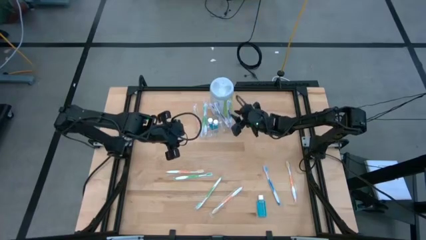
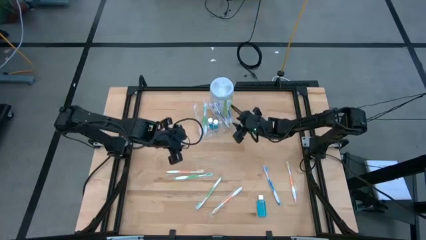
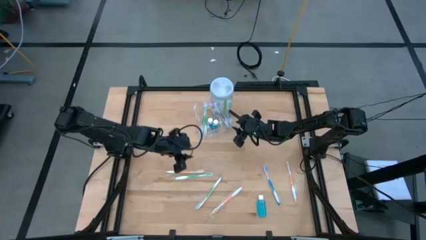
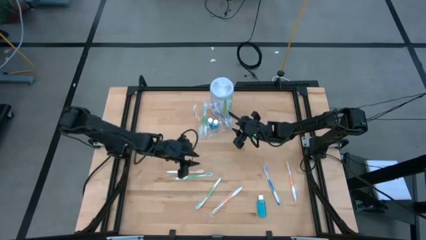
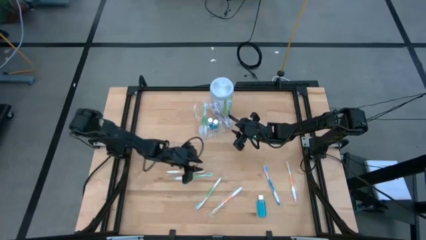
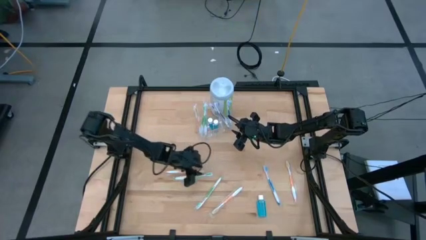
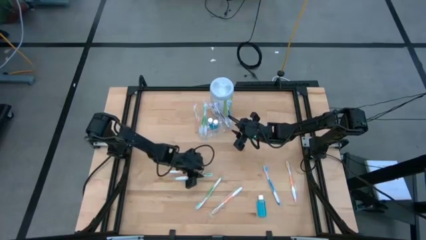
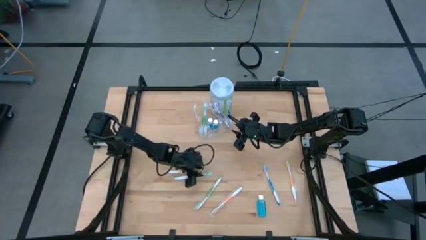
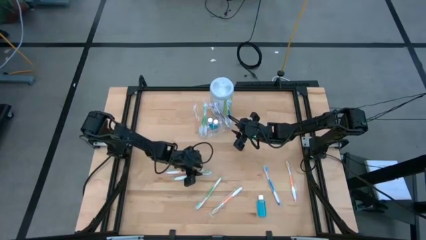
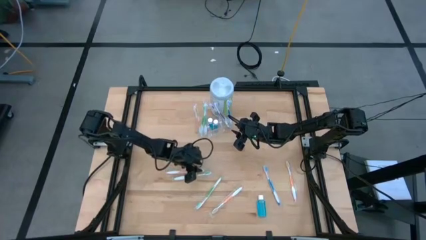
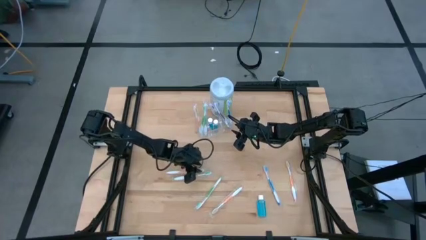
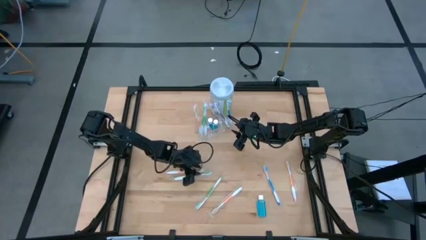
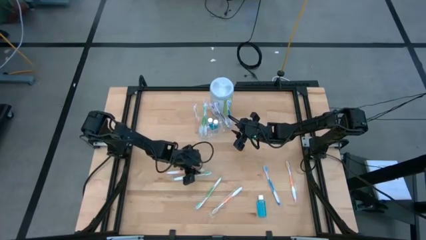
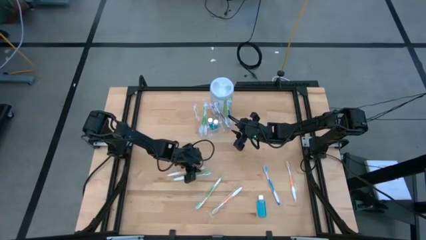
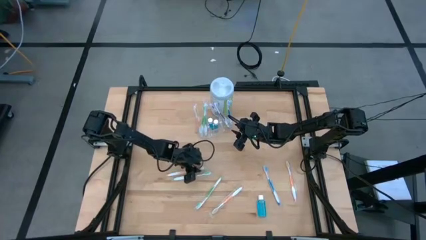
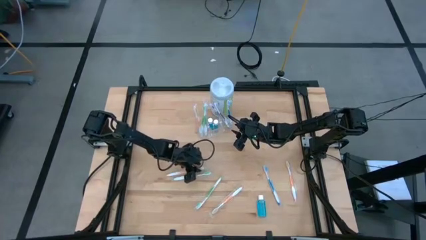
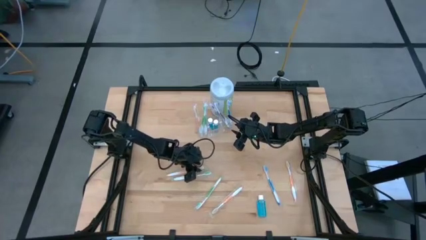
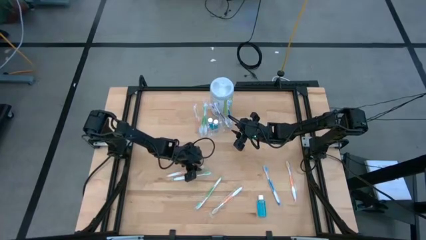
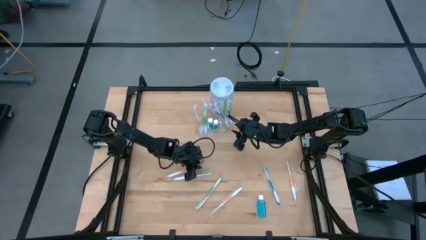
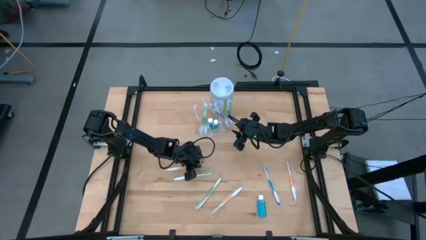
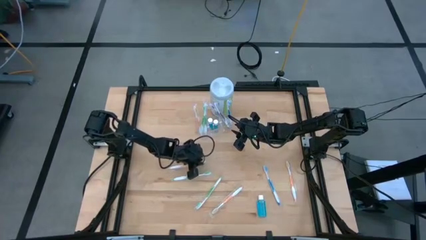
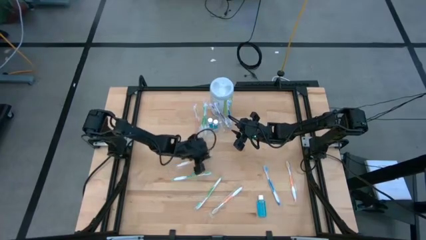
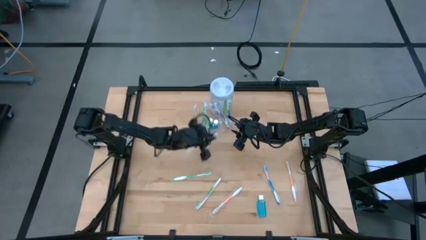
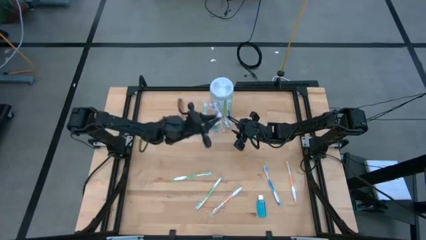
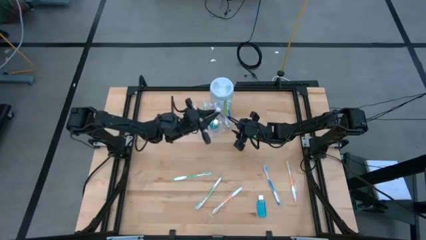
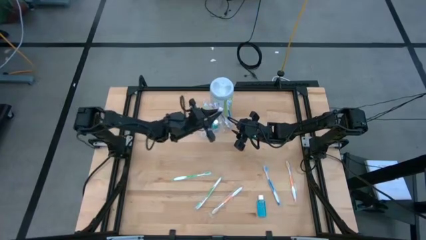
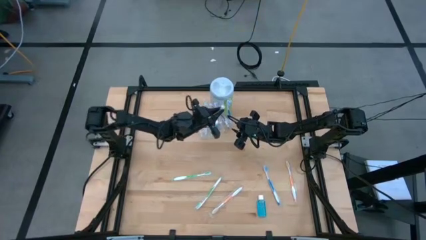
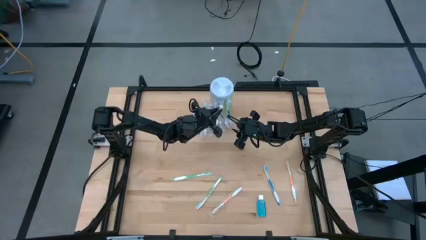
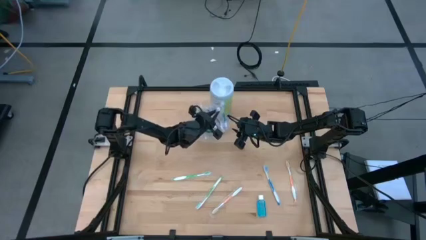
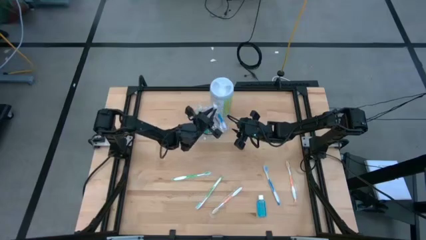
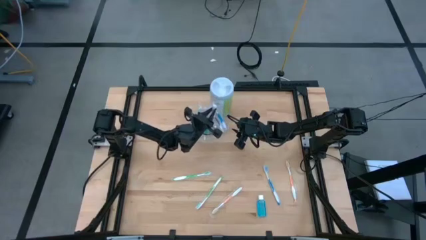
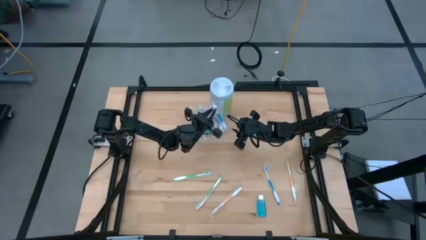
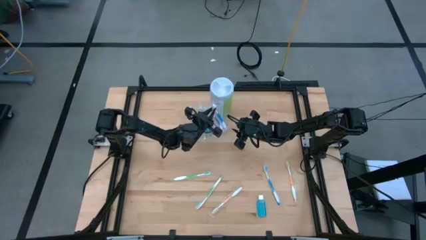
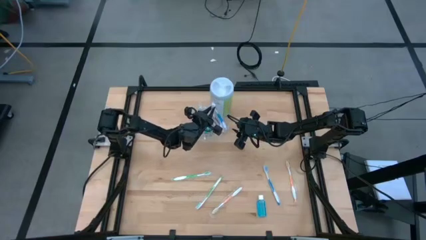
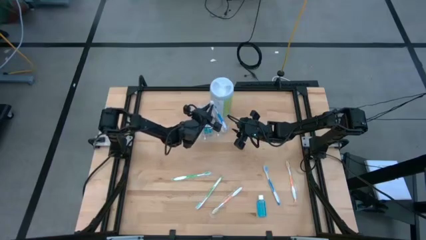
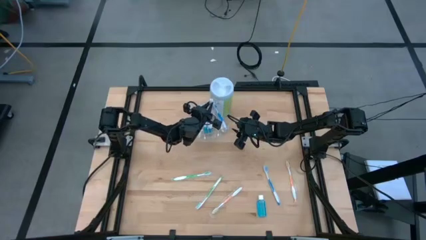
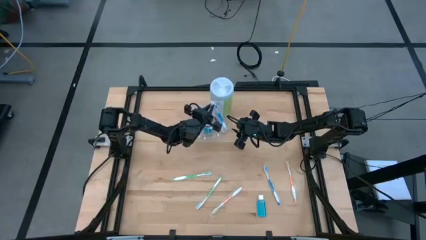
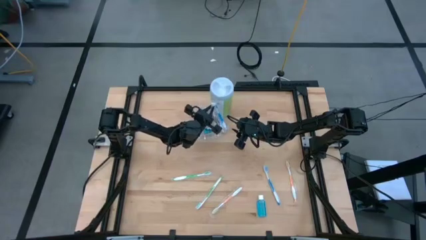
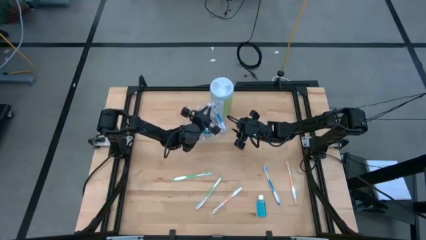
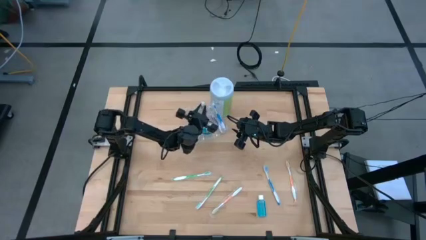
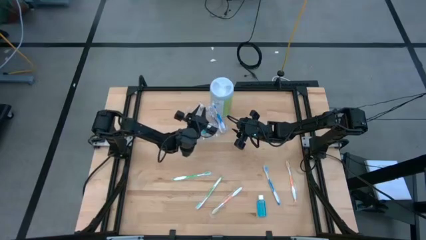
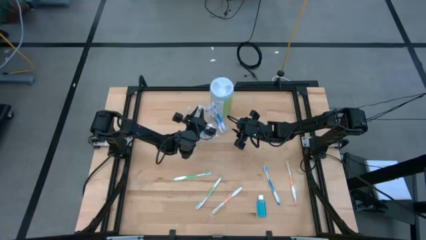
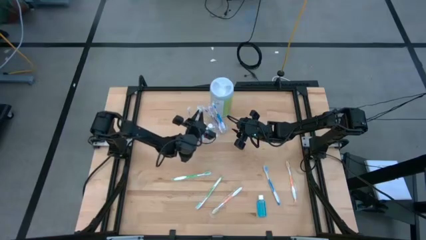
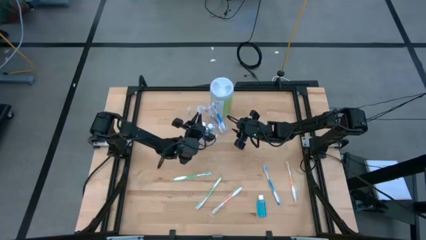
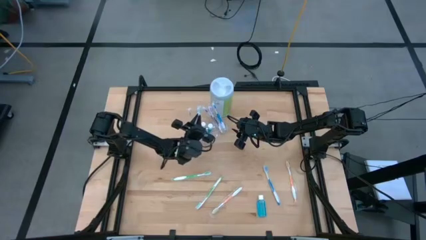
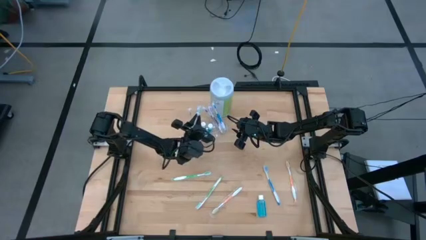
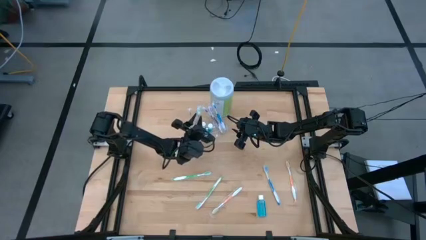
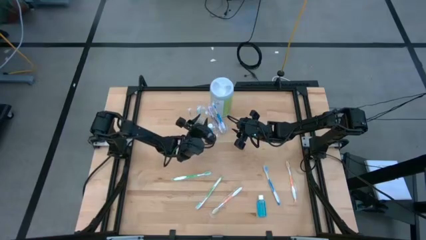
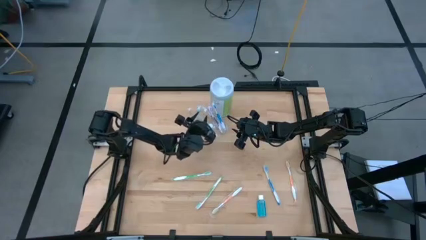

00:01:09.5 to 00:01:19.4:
Task: Pick & Place toothbrushing station
Put the yellow toothbrush into the transparent organizer

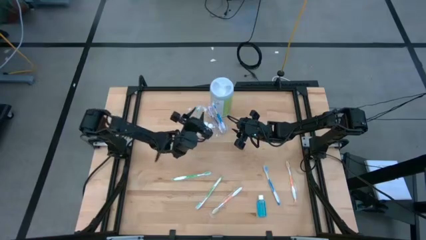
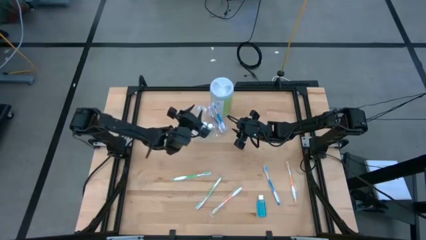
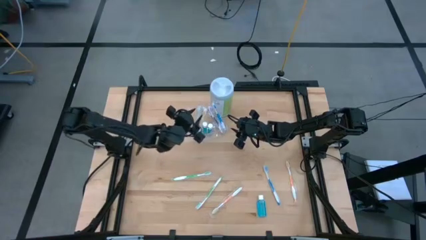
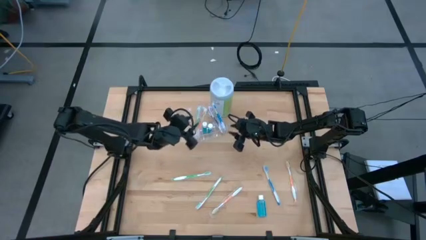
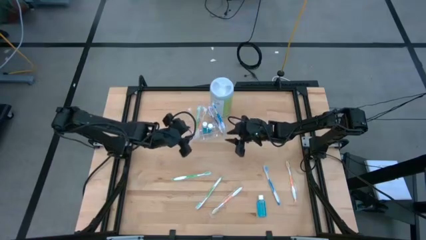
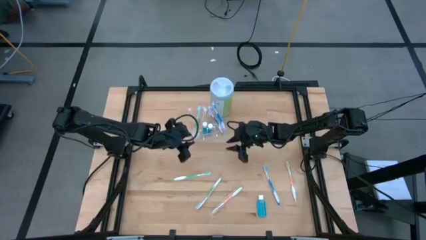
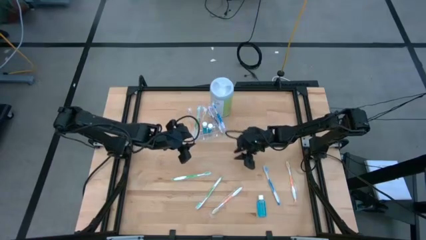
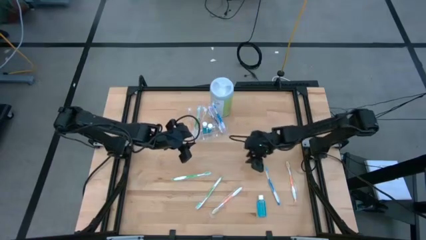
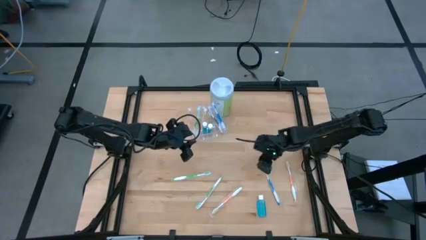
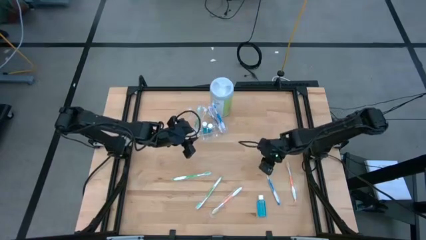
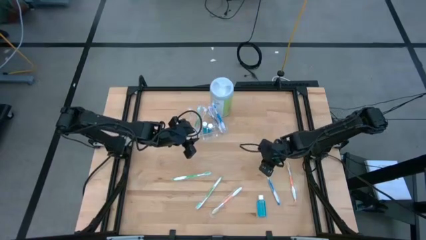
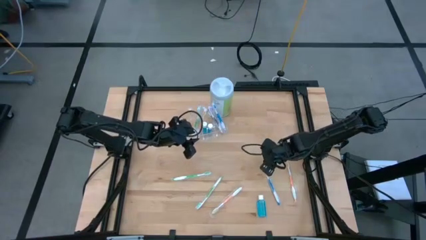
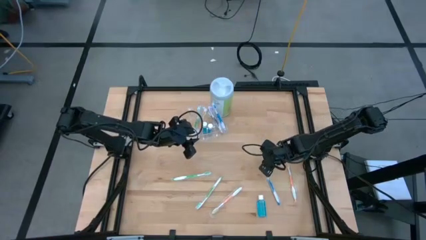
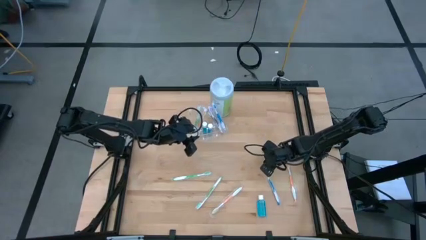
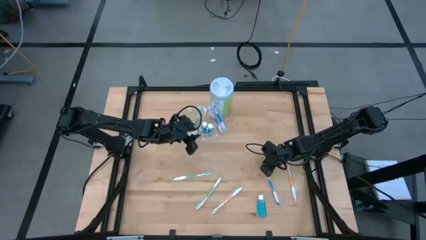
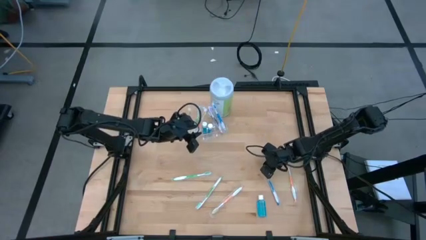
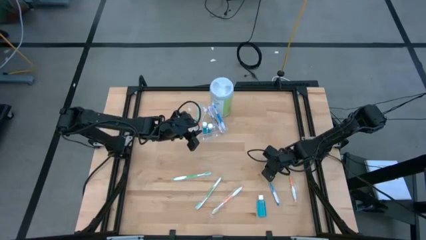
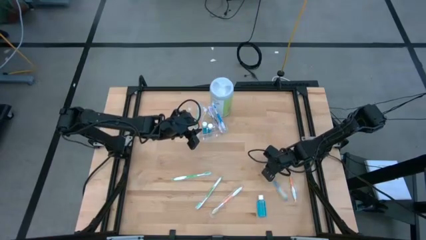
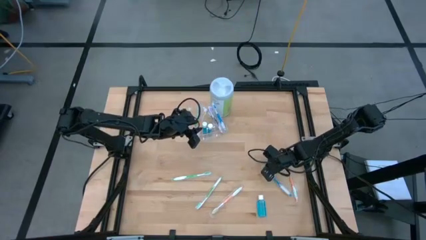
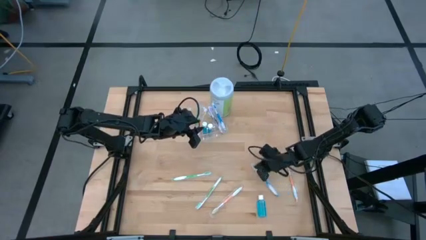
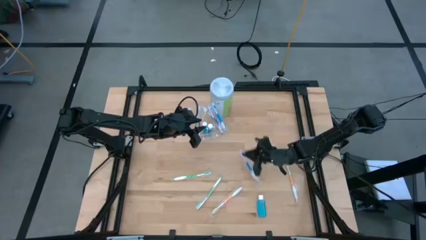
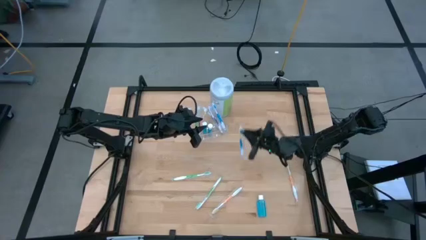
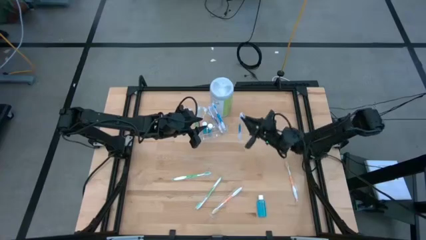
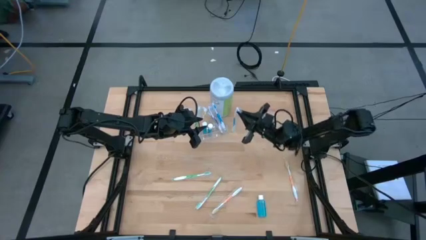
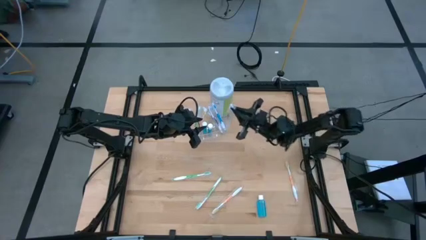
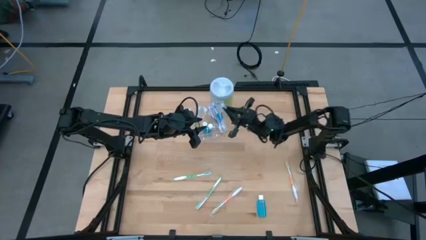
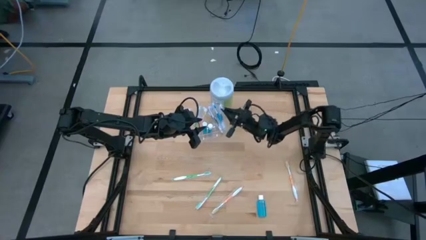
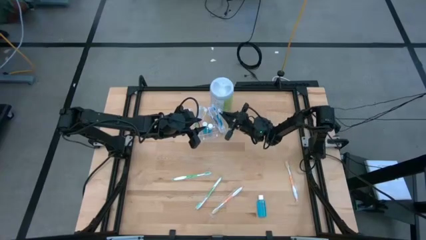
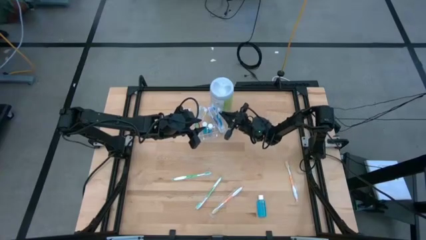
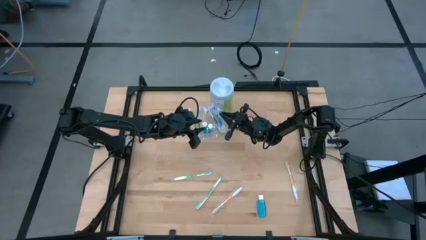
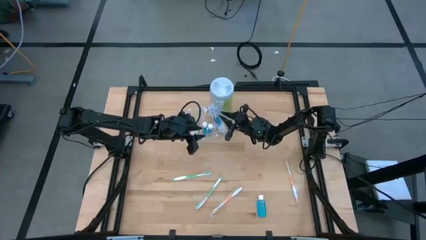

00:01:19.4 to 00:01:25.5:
Put the blue toothbrush into the transparent organizer

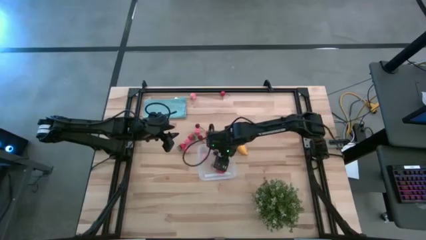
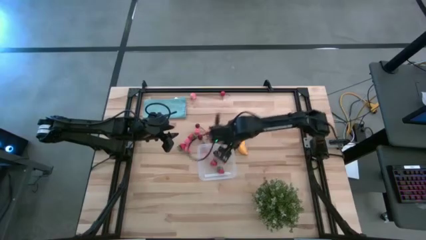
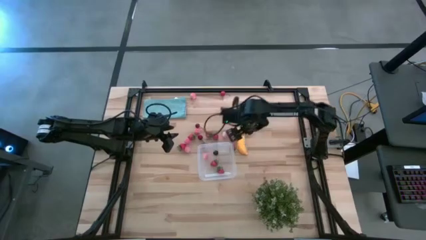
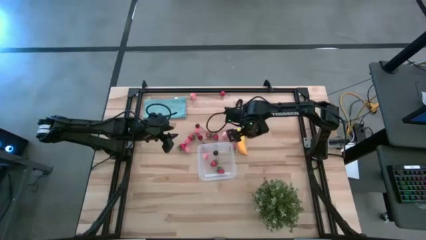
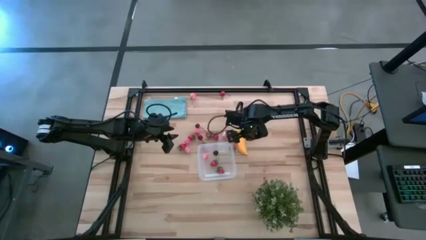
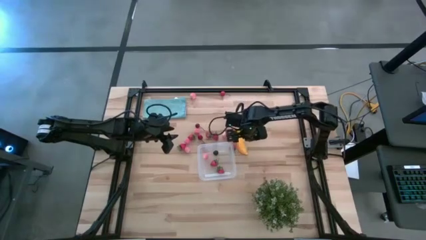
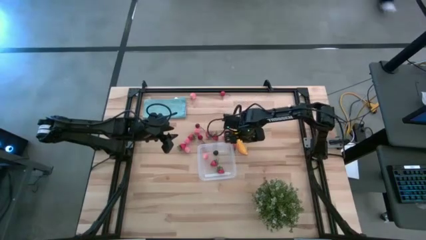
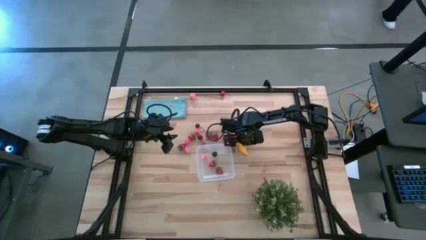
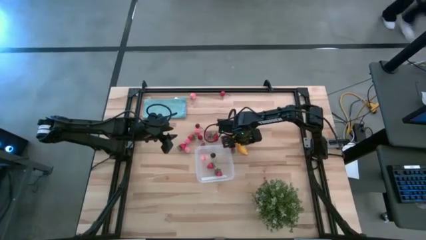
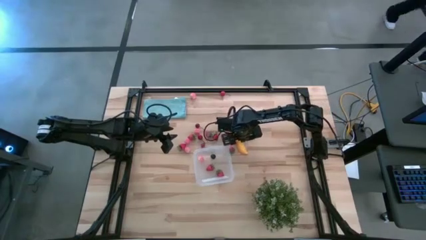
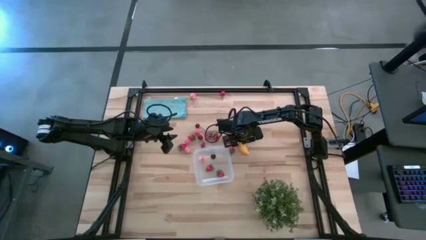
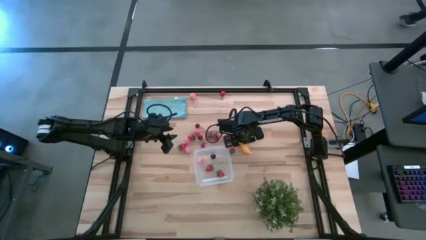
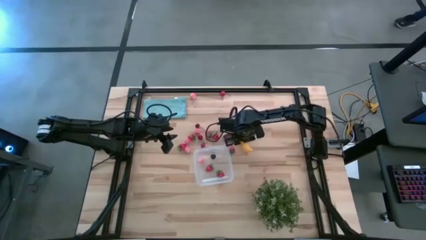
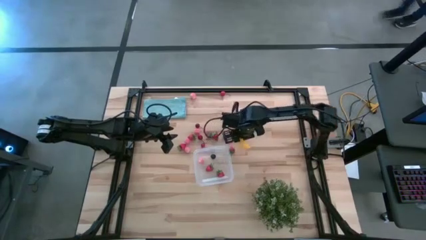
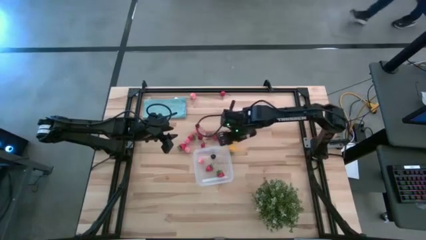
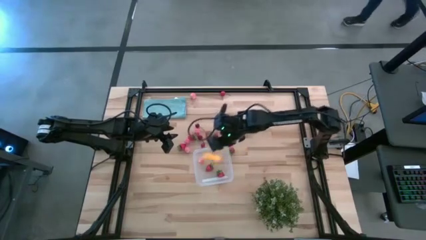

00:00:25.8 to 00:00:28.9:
Task: Pick and placing Produce into tupperware
Put the yellow banana into the transparent bin
